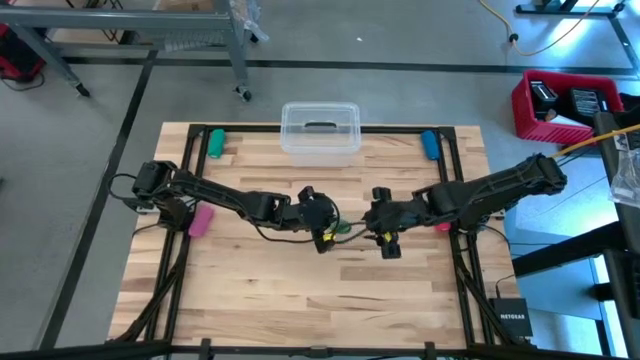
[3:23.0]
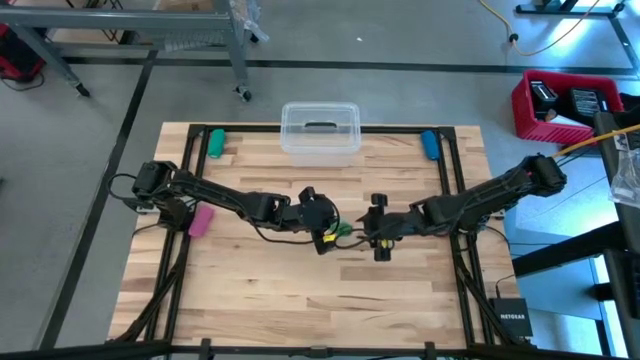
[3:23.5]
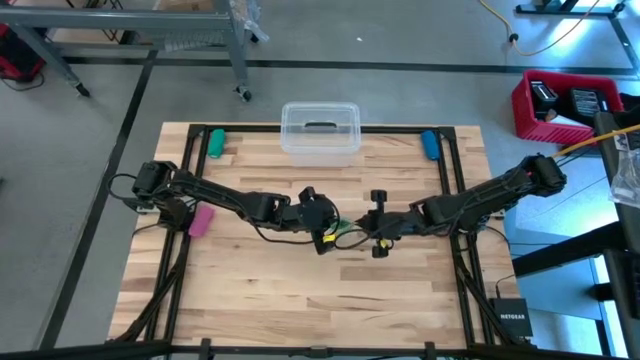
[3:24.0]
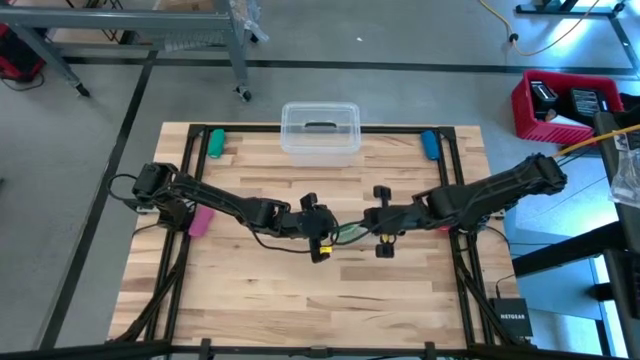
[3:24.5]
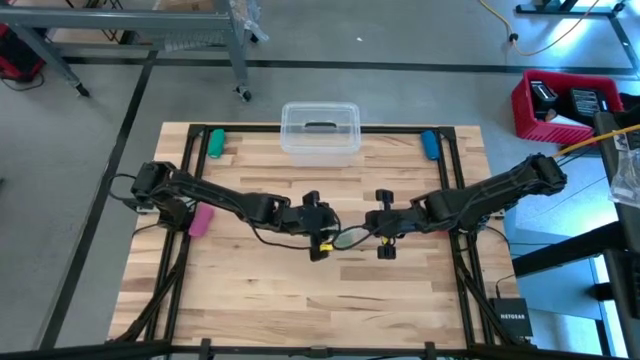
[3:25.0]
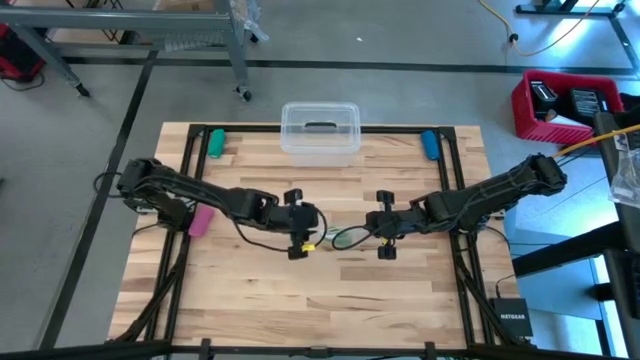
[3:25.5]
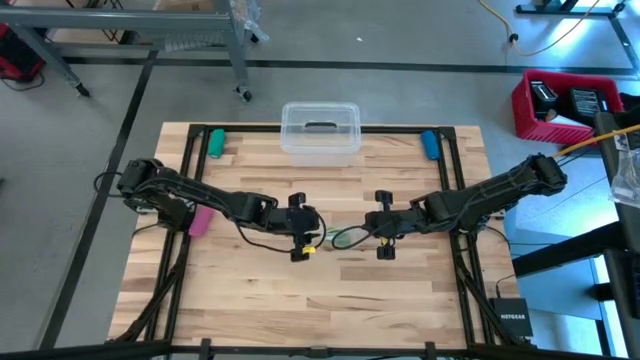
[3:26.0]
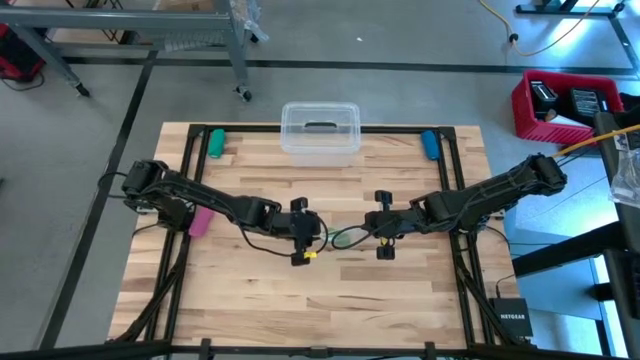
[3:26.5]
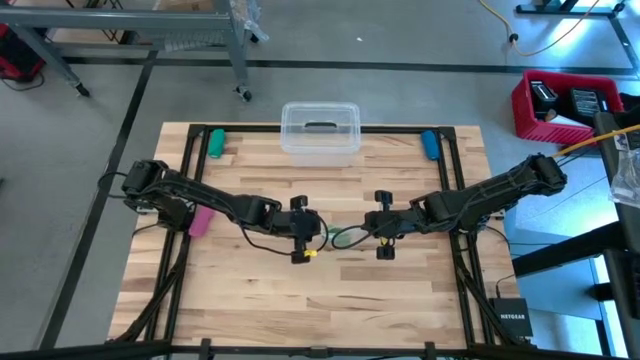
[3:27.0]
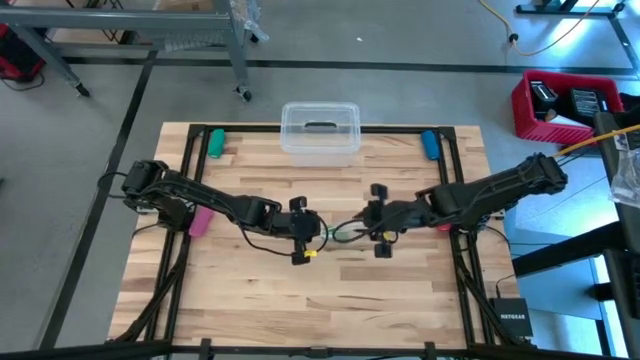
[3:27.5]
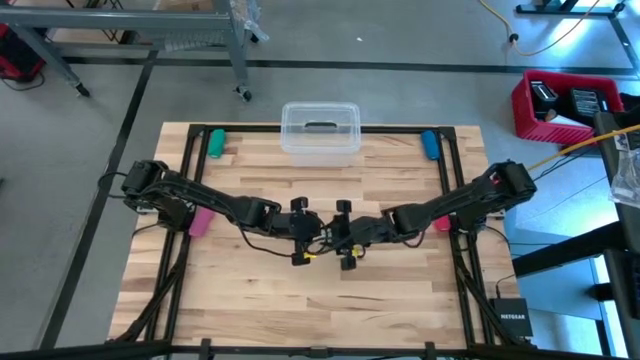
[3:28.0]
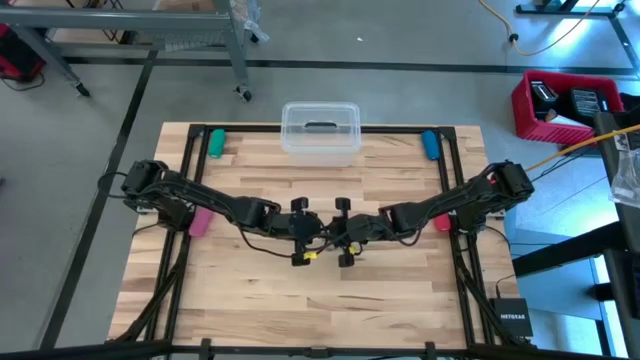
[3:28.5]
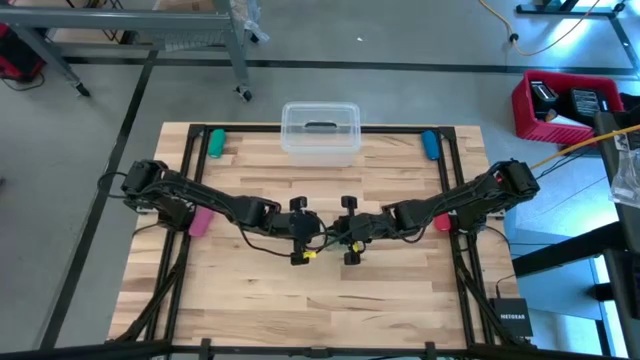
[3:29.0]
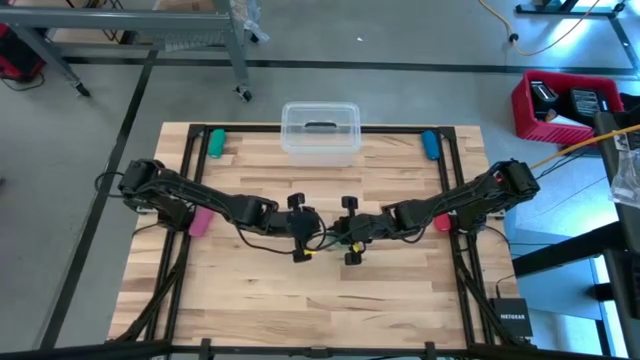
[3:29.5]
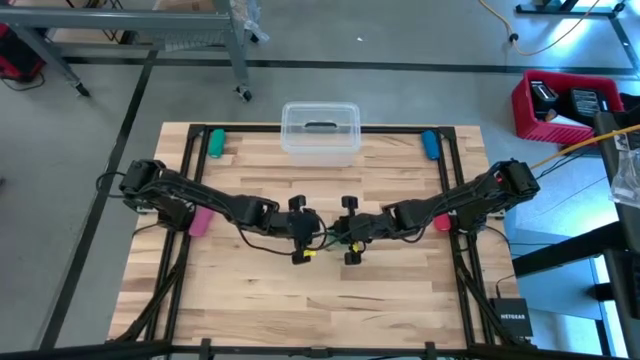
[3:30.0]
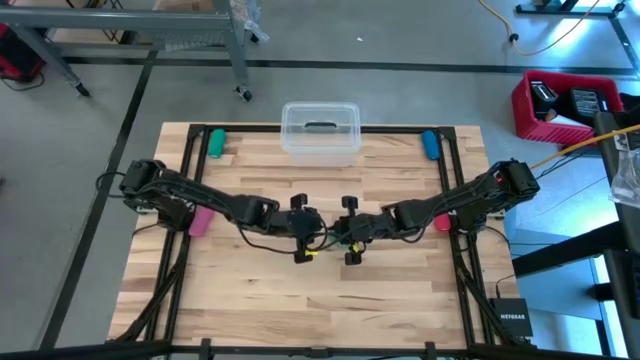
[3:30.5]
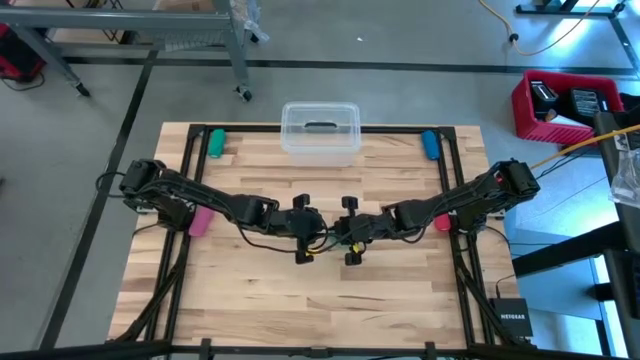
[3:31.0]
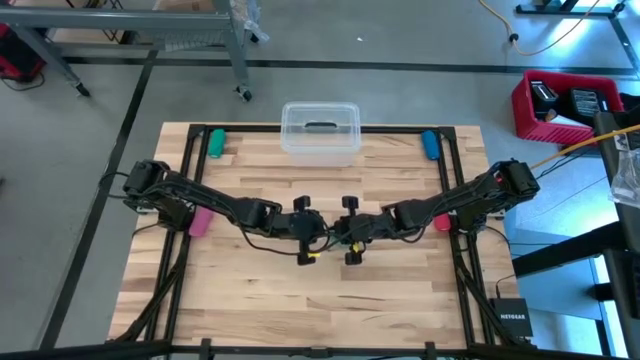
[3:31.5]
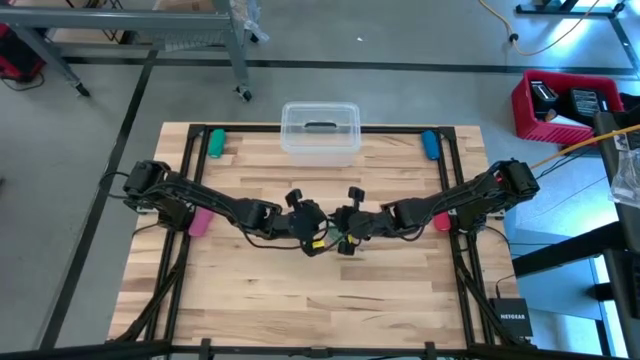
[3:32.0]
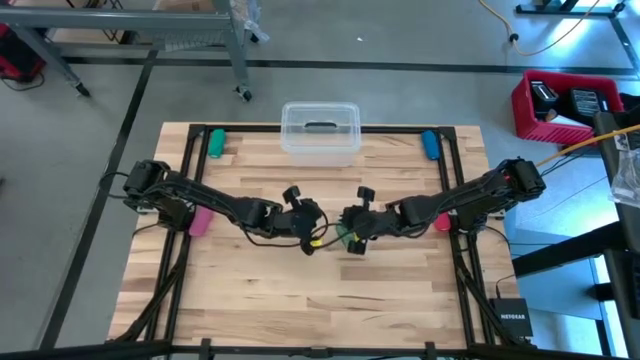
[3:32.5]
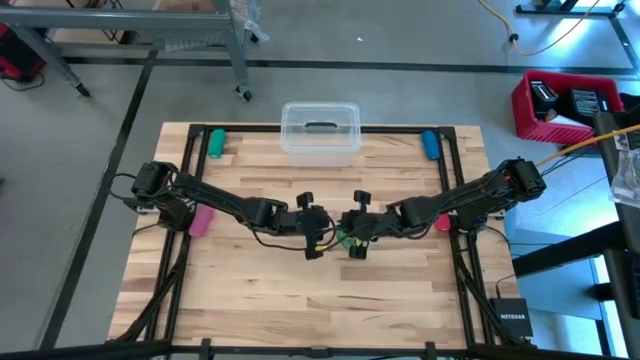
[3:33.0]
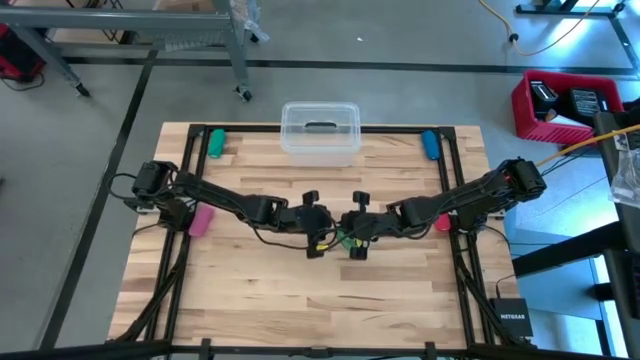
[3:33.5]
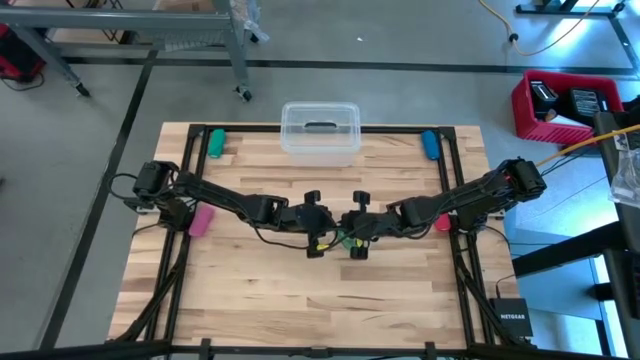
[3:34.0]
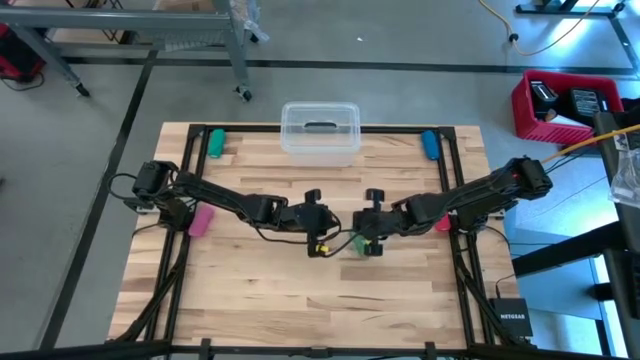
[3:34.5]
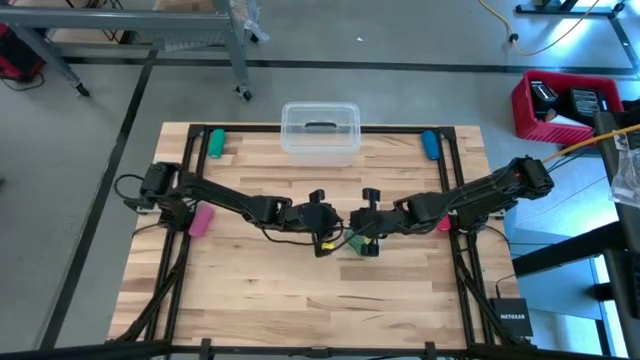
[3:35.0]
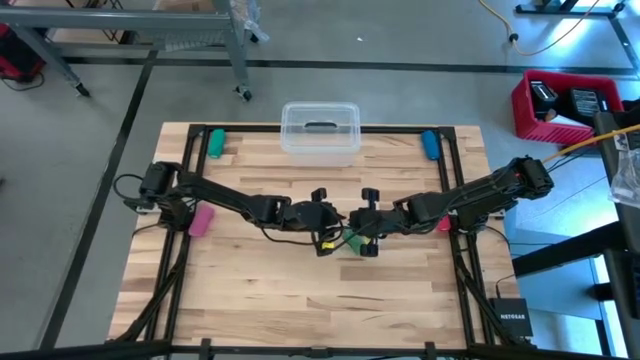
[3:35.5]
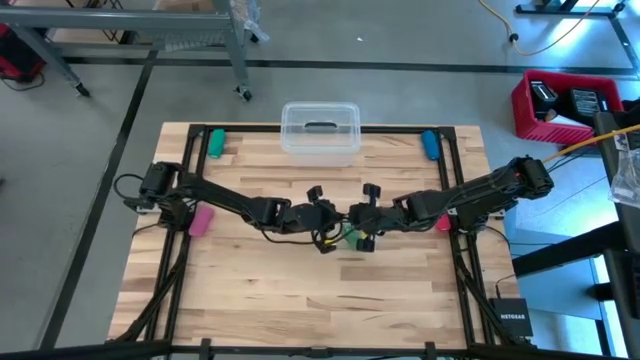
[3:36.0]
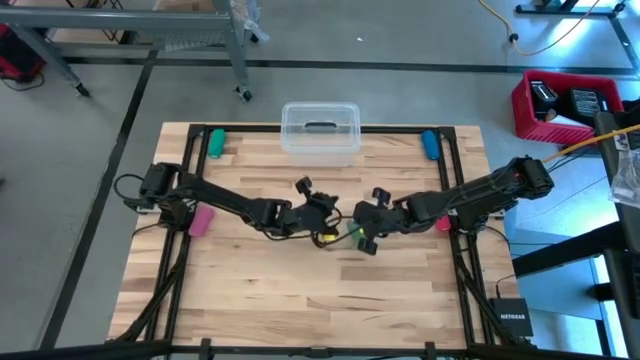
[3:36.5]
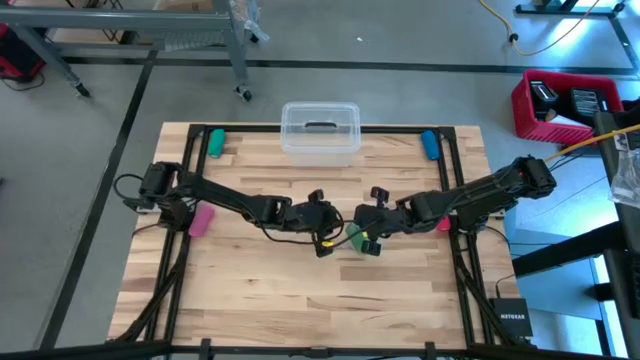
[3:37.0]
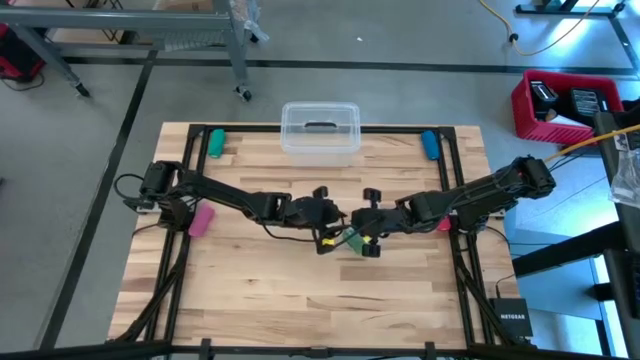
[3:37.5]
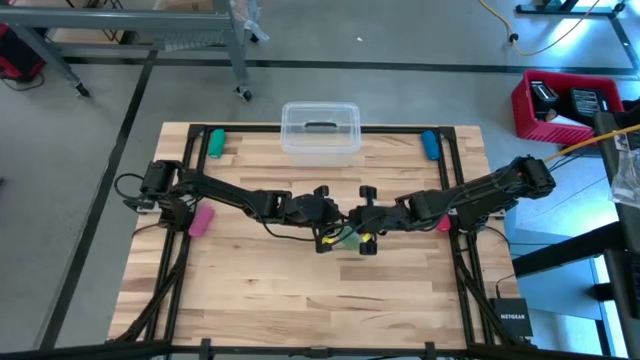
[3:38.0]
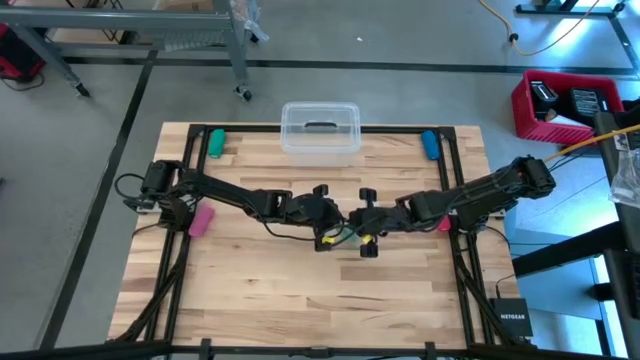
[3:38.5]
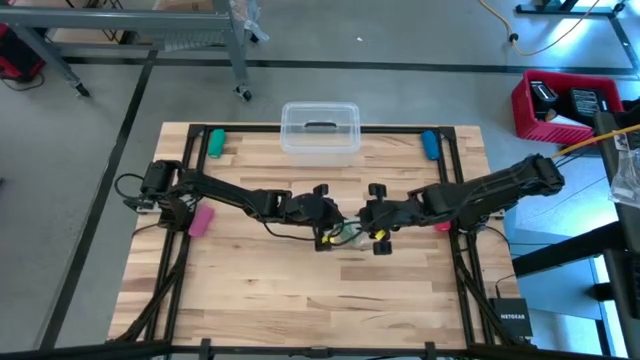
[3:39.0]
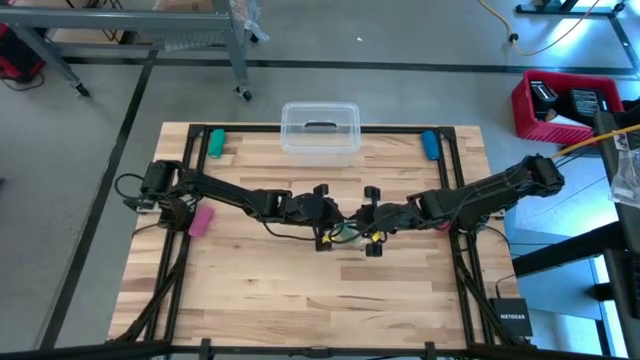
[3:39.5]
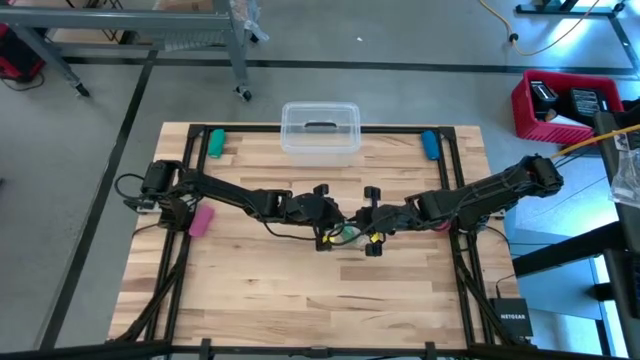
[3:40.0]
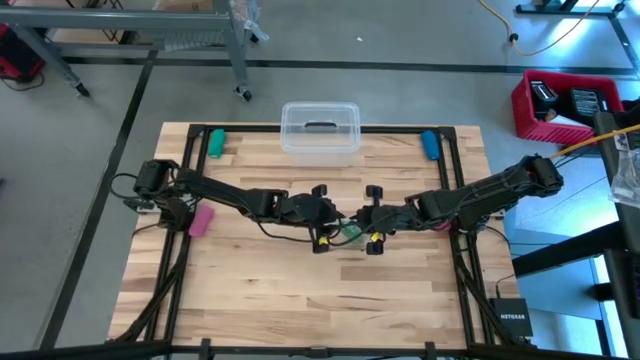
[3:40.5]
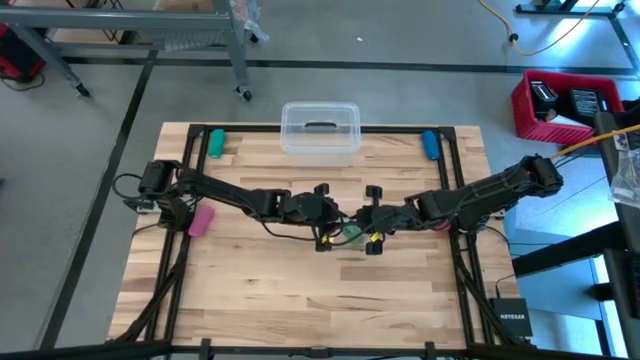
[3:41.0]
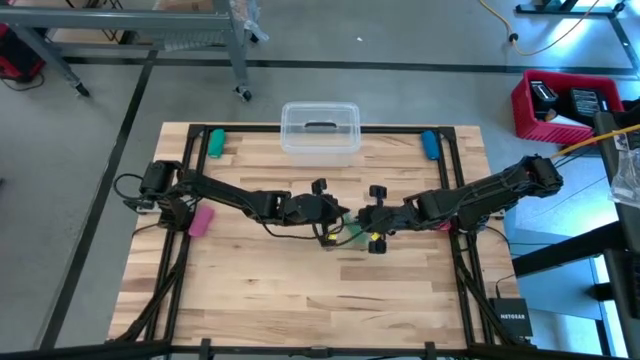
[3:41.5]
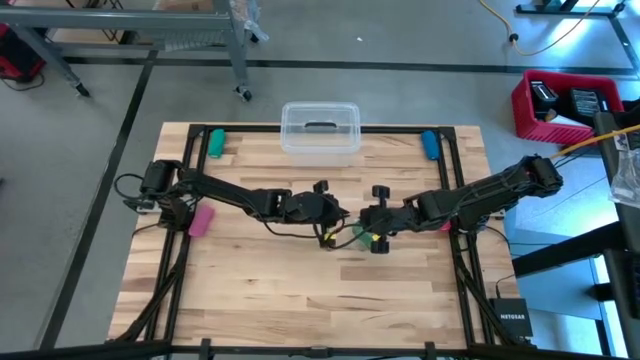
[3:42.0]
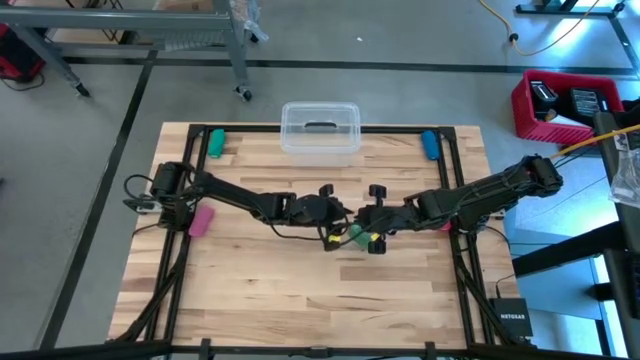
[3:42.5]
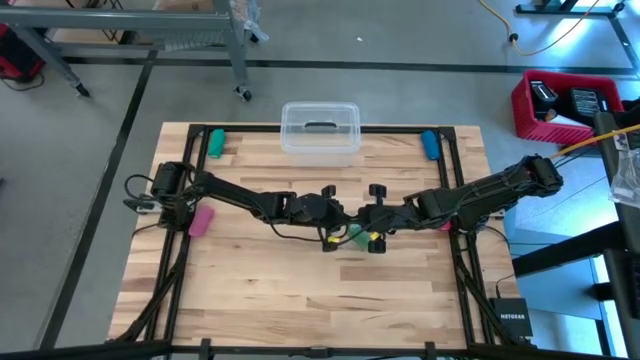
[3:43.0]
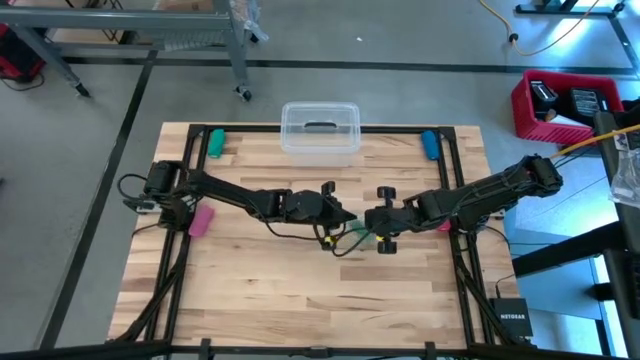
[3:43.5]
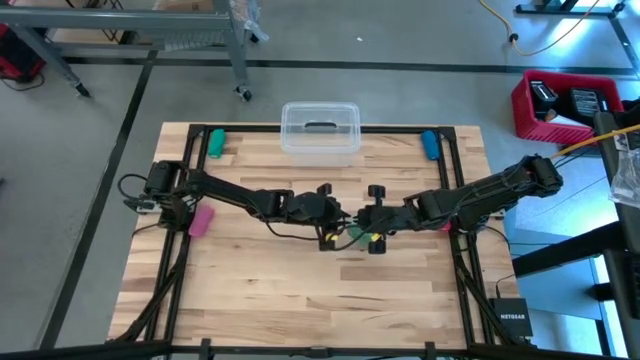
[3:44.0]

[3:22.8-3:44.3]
Task: Roll bandage
Close the transparent zip bag
